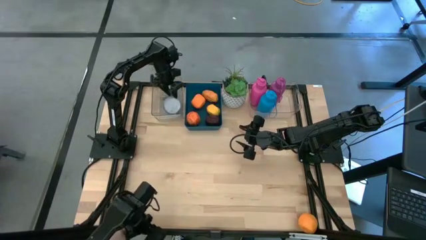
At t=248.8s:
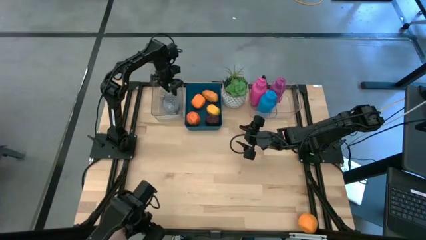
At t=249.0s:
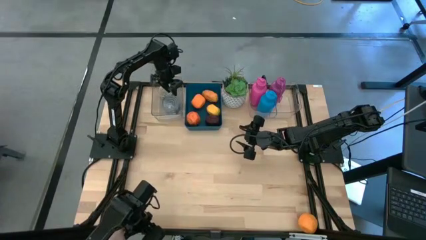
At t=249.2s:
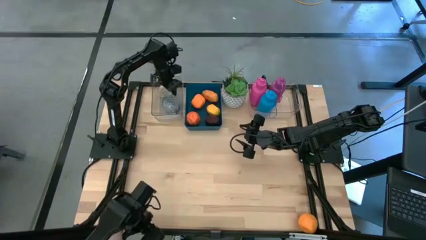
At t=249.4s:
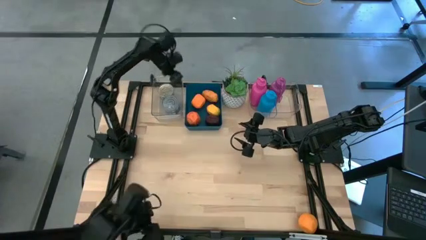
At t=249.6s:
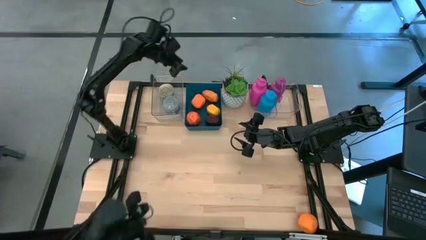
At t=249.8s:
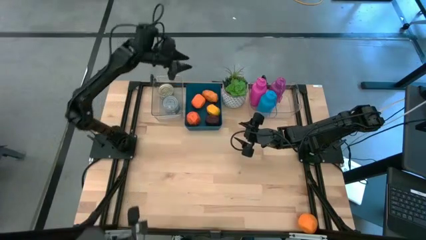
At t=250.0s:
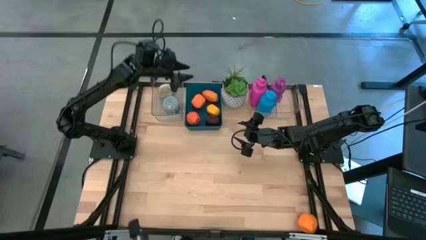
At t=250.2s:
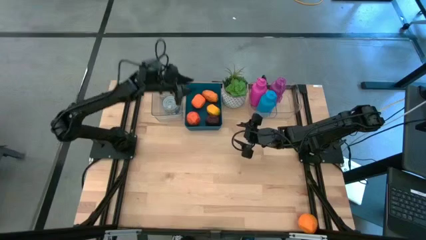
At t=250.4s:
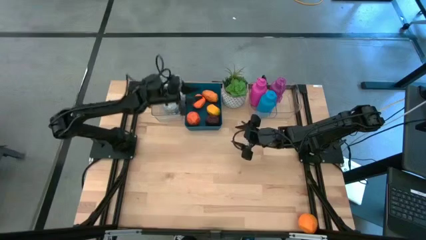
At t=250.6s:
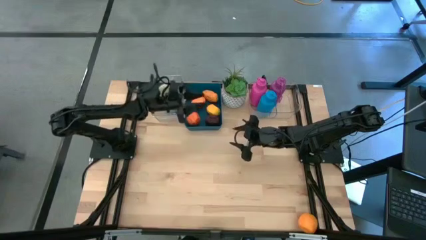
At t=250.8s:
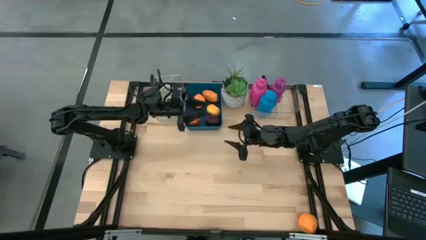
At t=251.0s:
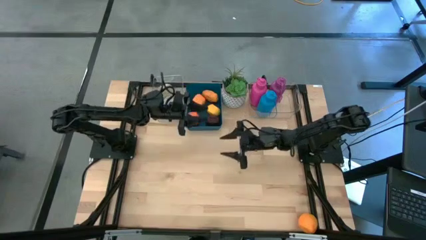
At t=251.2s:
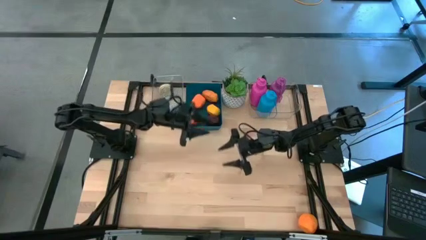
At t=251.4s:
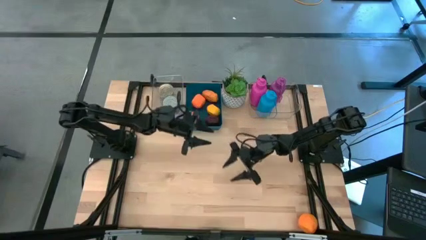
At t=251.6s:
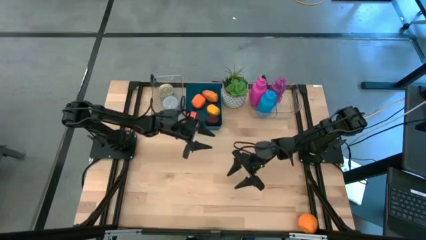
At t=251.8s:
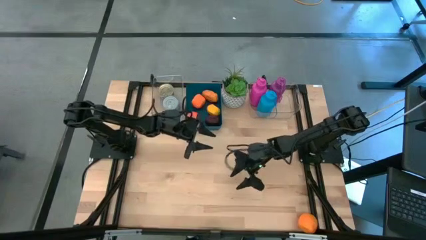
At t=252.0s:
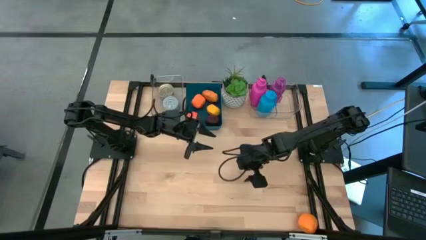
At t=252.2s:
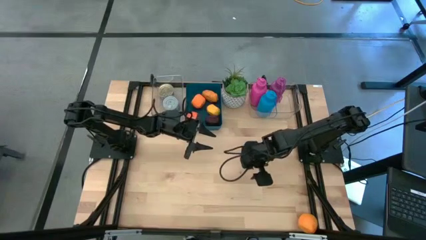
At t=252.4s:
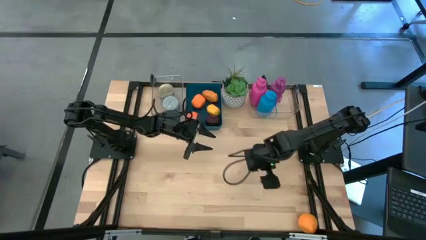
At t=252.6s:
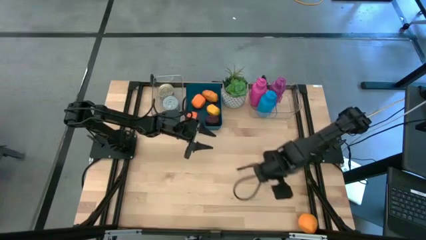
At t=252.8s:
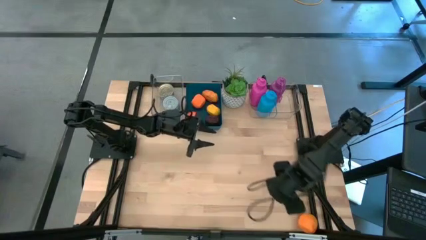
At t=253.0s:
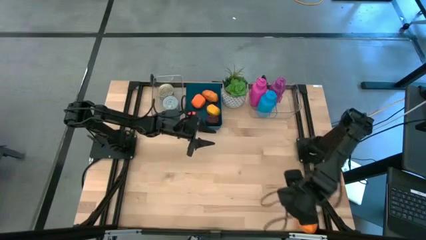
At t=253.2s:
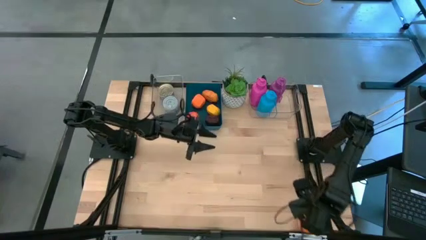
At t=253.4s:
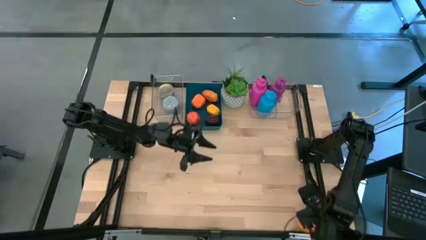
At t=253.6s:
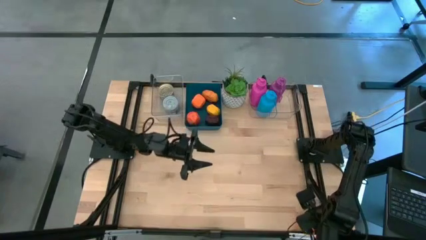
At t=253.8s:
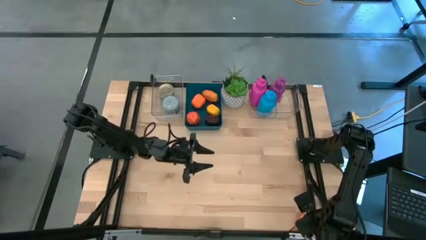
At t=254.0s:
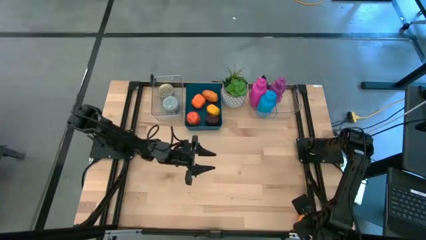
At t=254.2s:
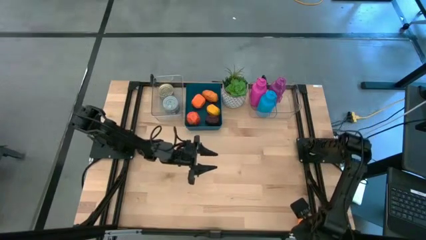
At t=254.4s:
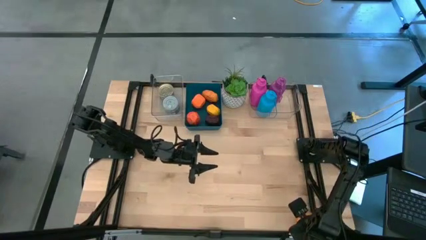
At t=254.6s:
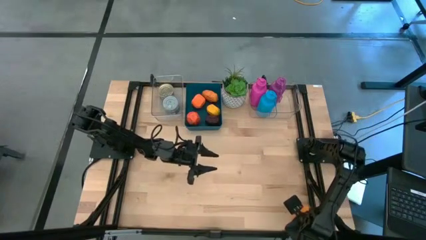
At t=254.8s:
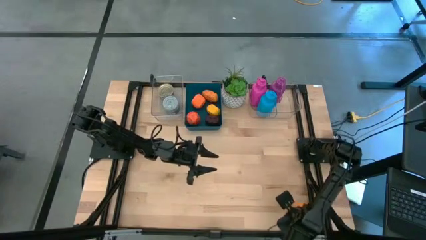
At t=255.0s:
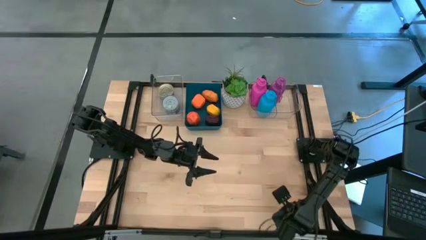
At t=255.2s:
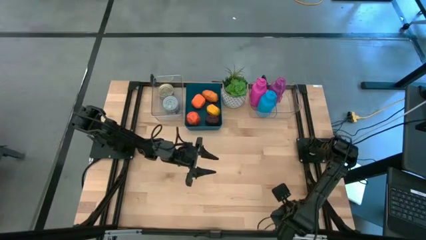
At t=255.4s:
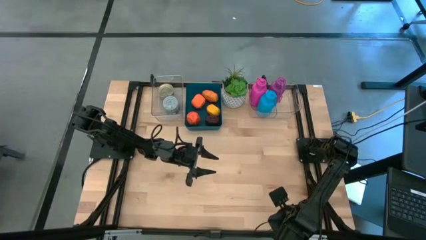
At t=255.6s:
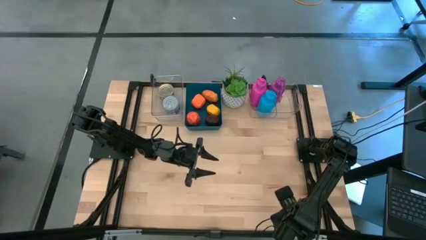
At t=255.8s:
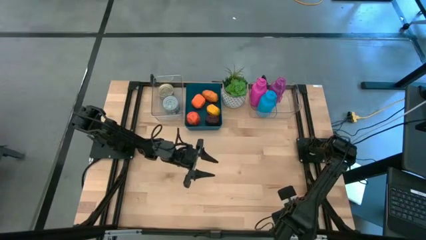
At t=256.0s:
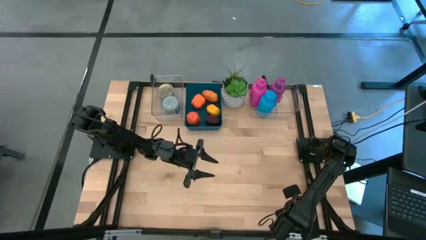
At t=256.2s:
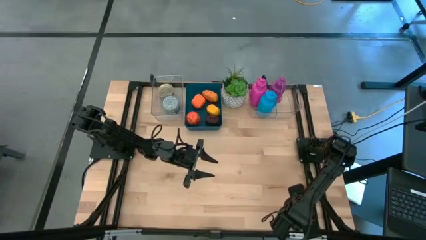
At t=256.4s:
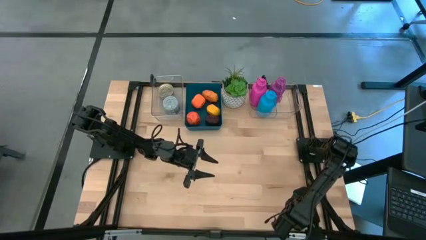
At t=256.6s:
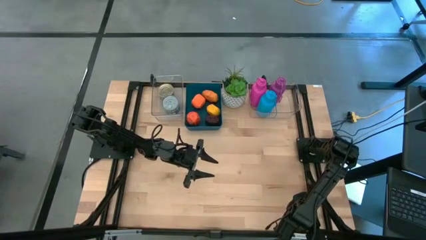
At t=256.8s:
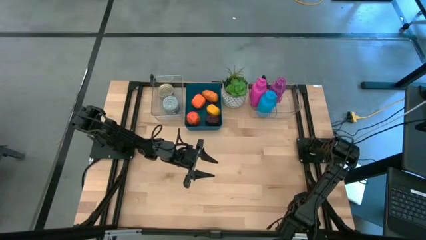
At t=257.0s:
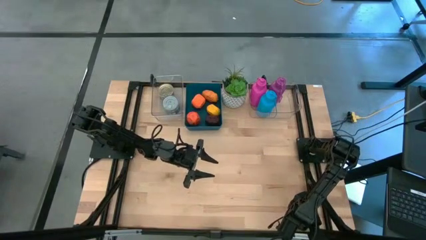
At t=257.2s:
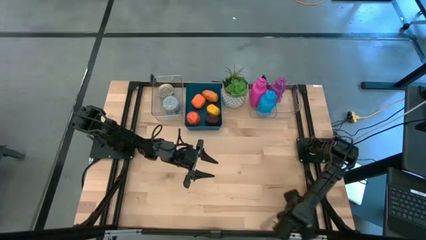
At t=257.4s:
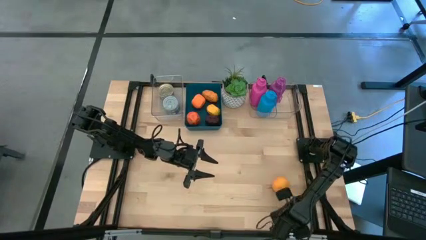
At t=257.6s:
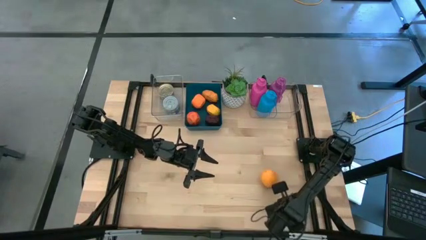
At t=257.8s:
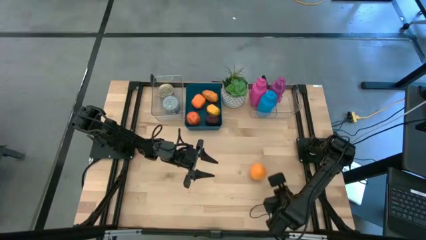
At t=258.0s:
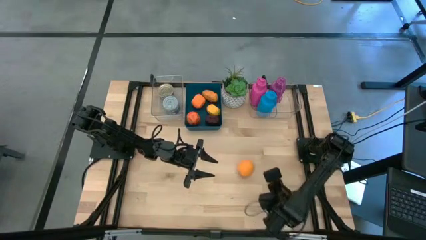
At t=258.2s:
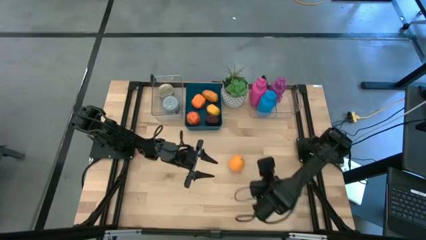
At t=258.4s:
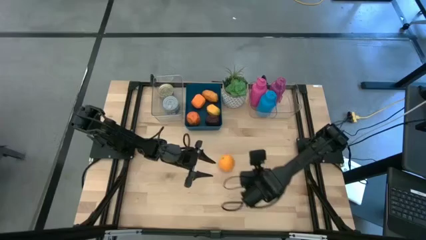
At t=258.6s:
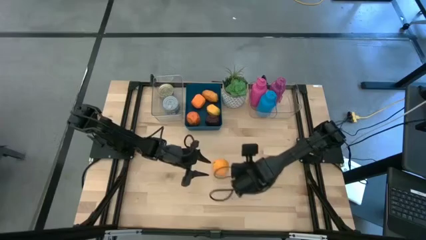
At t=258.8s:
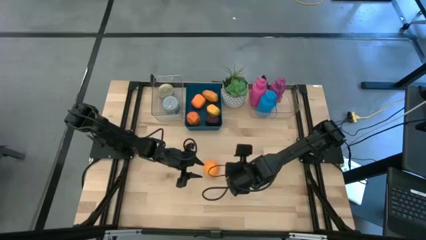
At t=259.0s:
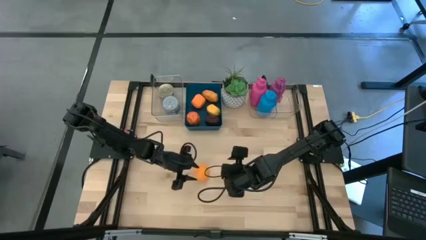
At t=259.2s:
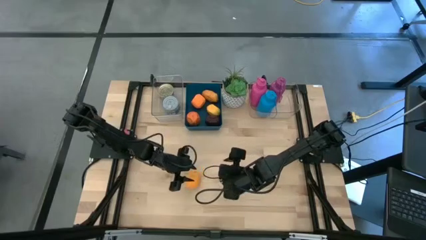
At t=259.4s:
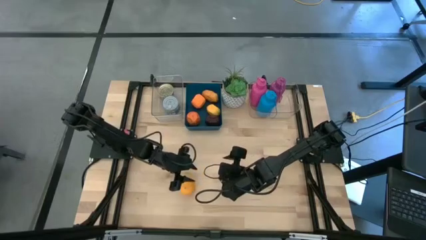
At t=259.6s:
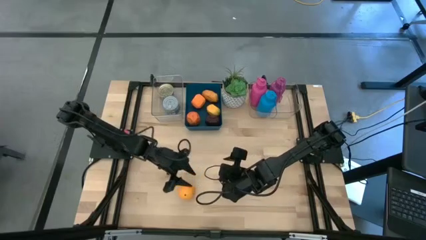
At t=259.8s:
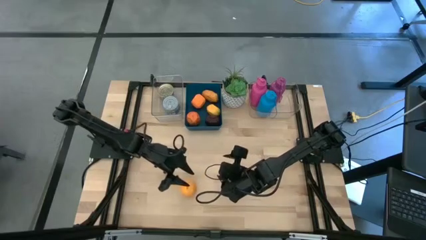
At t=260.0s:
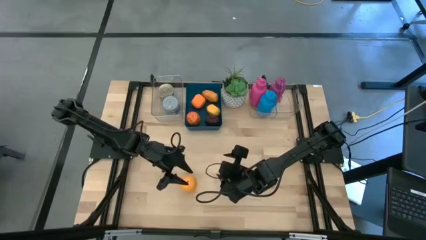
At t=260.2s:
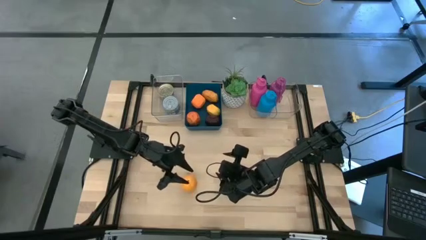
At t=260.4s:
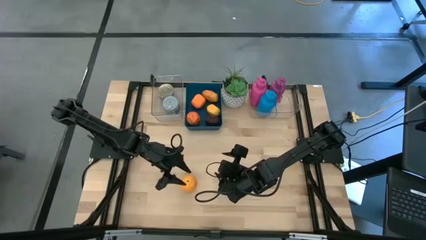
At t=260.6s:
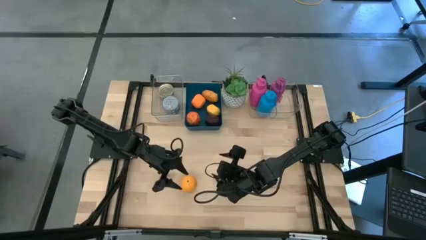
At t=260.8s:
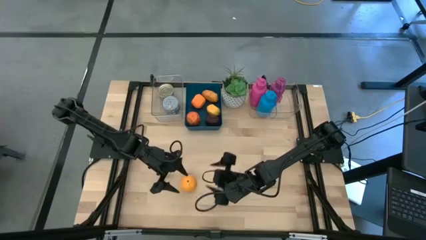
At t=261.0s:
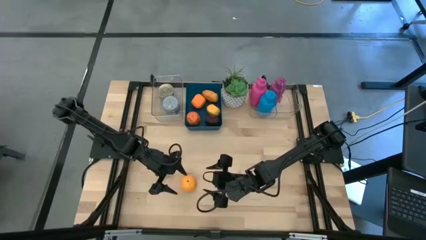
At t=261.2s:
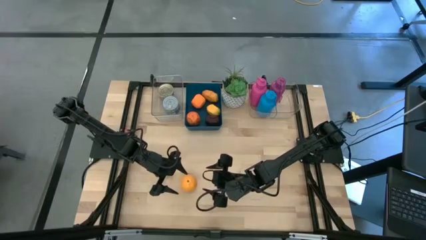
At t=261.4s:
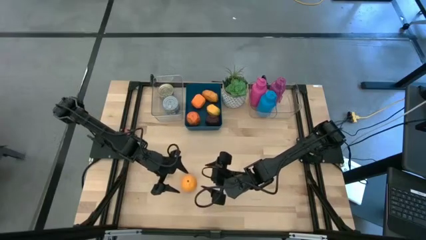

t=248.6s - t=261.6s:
Task: Pick & Place Food Item
Put the orange into the blue bin

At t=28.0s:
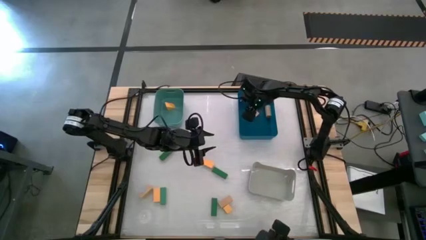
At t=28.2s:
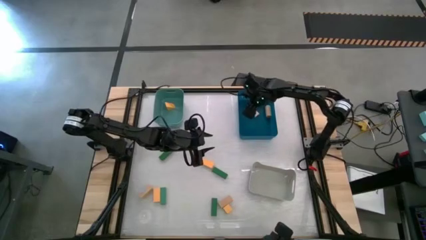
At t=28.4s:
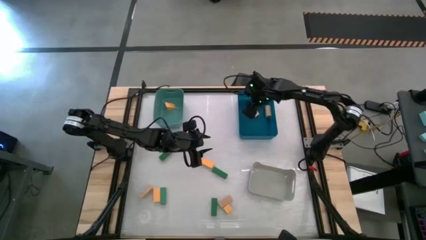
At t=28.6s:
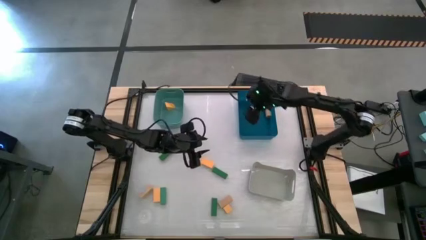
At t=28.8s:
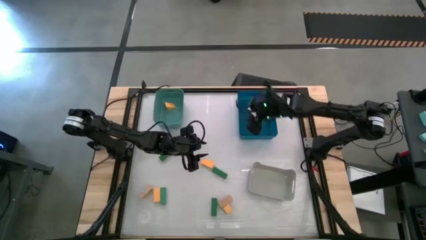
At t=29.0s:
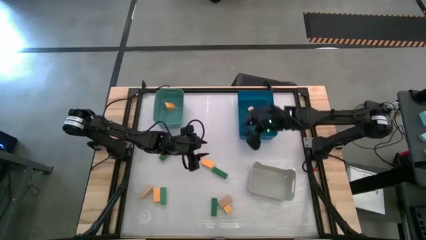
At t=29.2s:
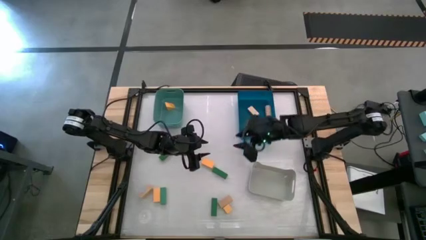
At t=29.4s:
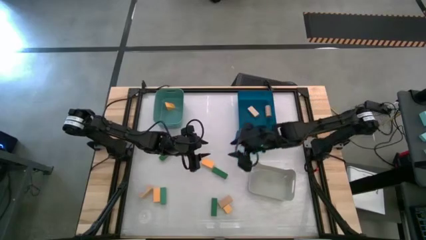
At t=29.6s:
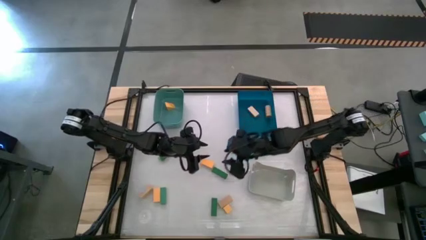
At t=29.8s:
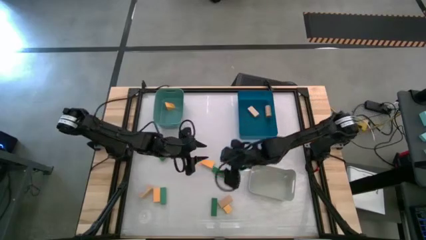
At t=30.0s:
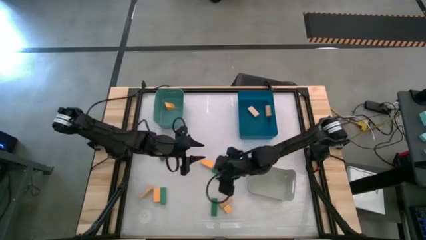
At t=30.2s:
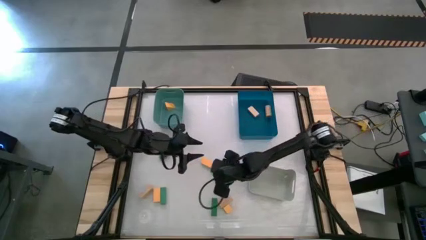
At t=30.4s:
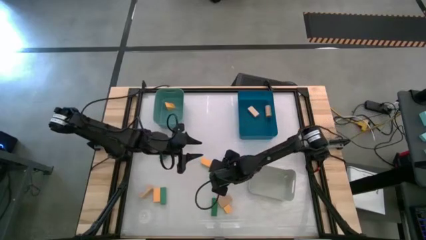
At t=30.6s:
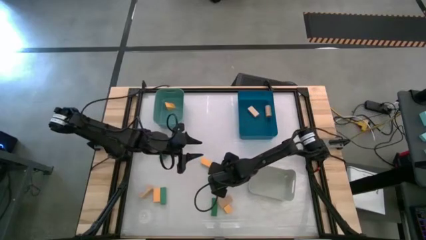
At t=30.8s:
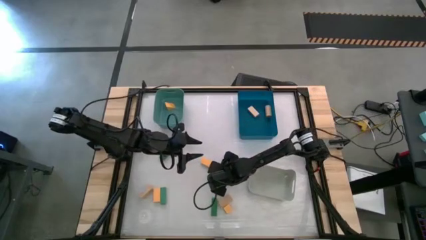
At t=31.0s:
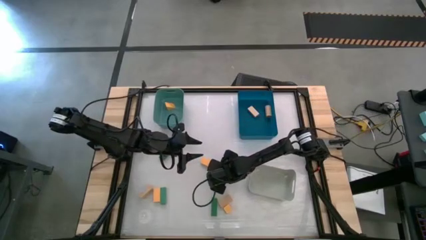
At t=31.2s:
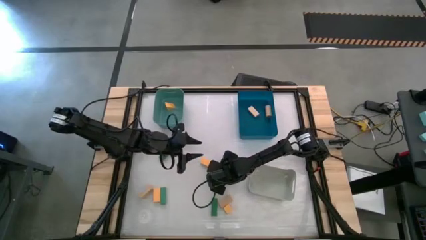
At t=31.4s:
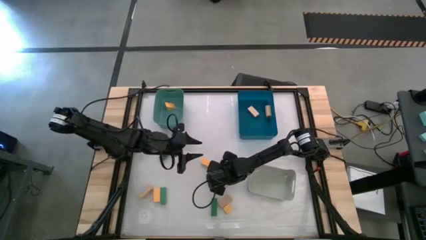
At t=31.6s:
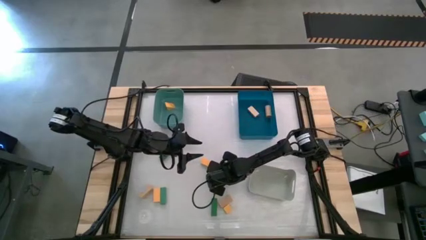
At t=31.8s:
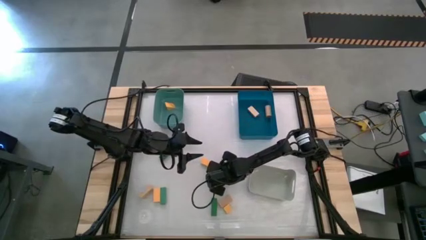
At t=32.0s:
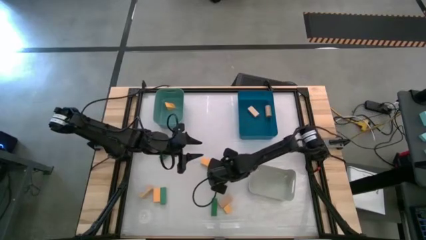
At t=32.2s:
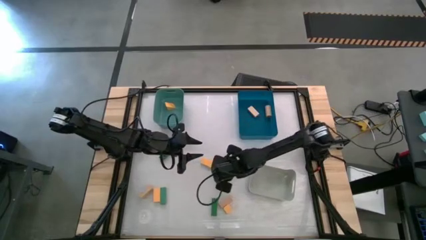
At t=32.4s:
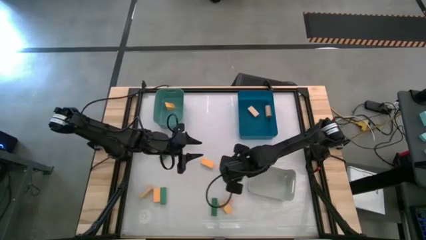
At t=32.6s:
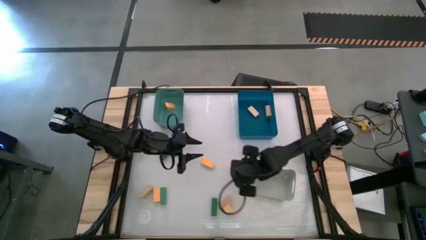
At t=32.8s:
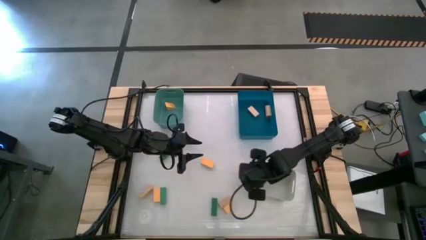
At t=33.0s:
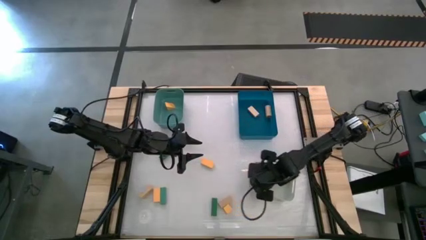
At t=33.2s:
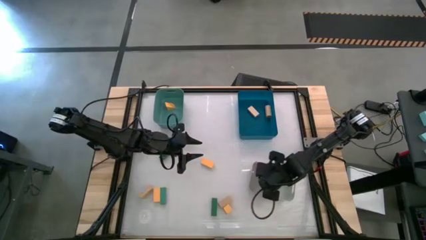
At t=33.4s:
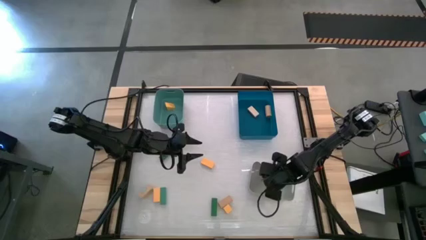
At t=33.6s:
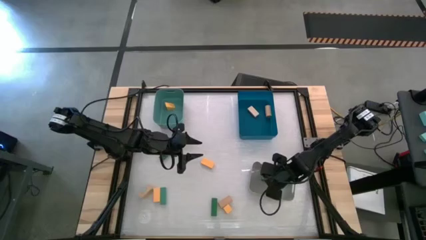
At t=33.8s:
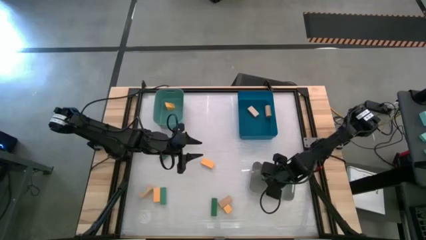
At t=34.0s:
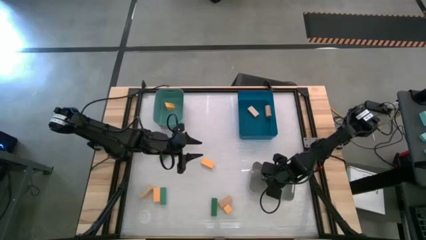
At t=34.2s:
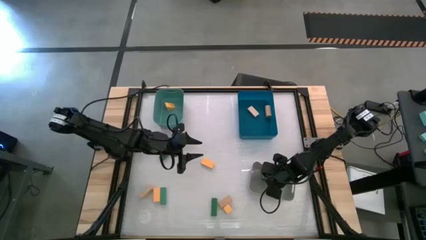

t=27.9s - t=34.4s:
Task: Sort & place blocks by color
Put the green wooden block into the gray bin
